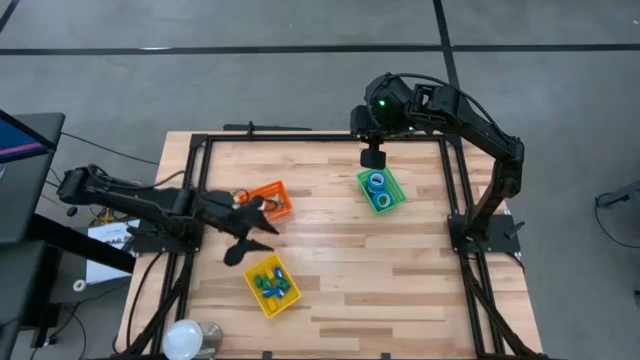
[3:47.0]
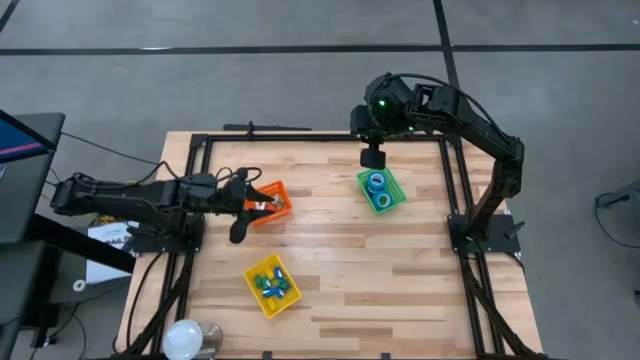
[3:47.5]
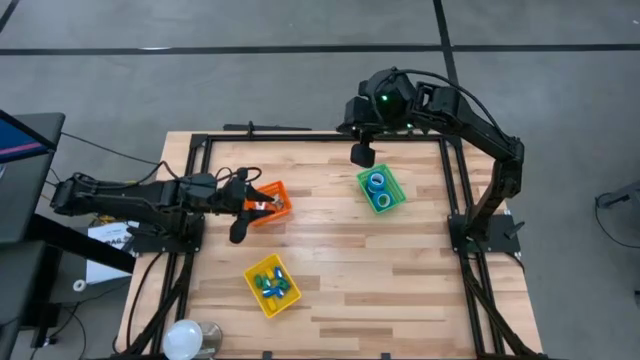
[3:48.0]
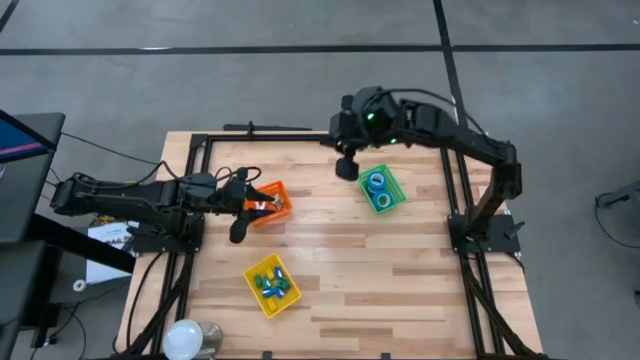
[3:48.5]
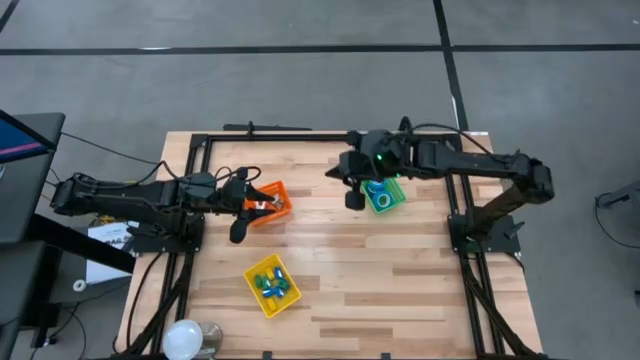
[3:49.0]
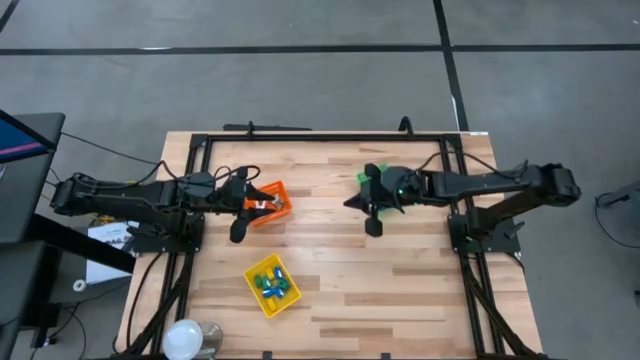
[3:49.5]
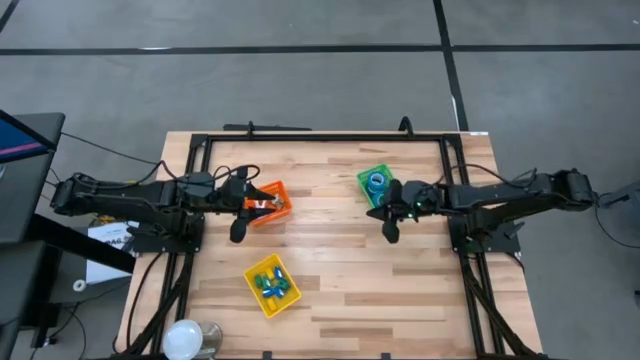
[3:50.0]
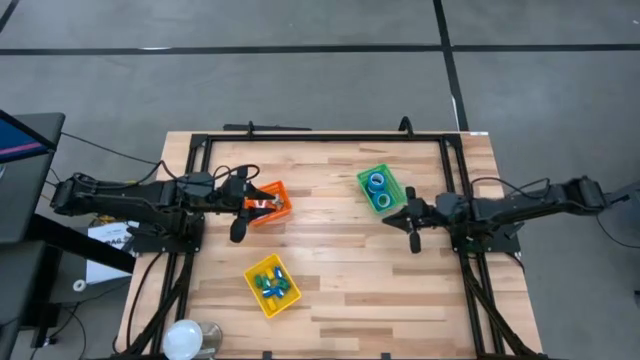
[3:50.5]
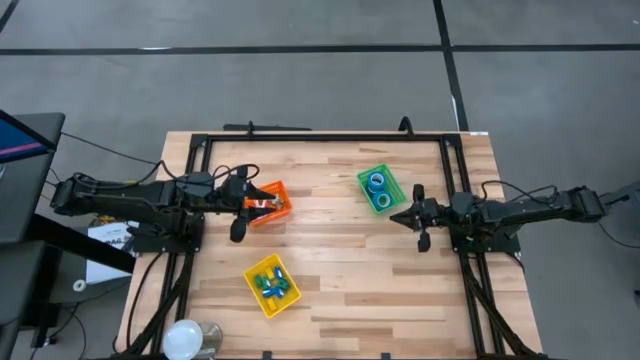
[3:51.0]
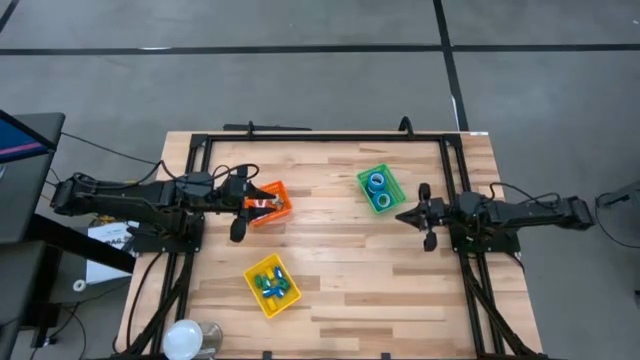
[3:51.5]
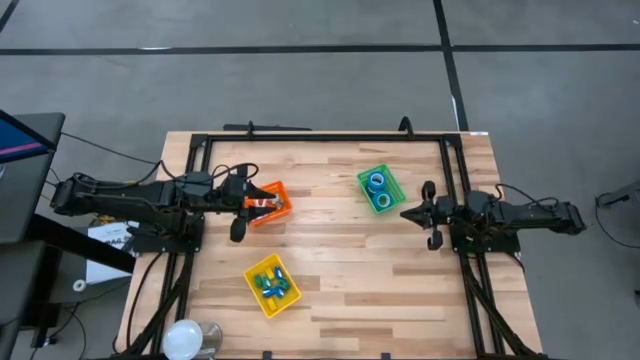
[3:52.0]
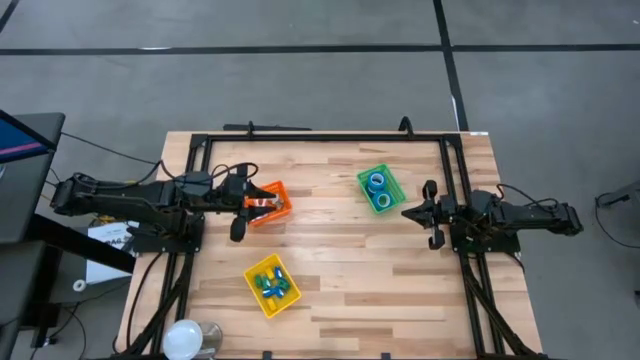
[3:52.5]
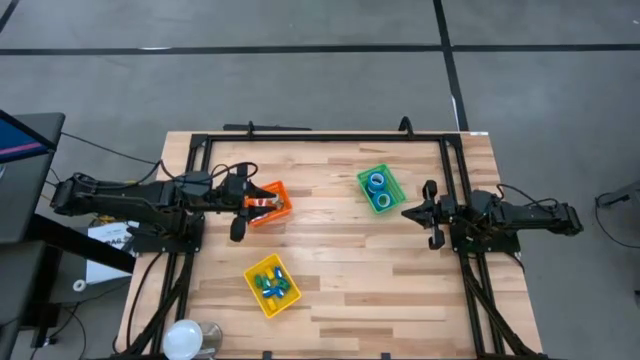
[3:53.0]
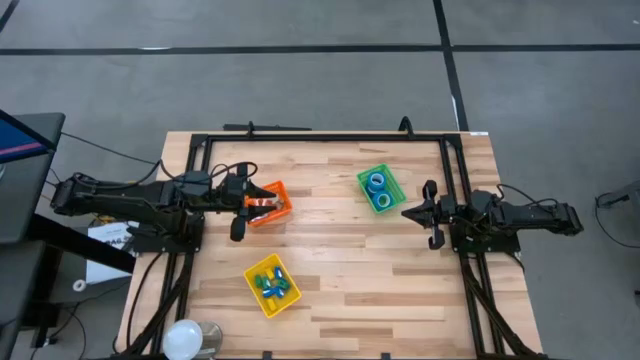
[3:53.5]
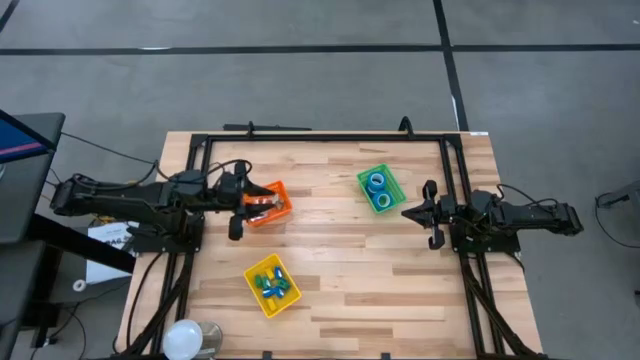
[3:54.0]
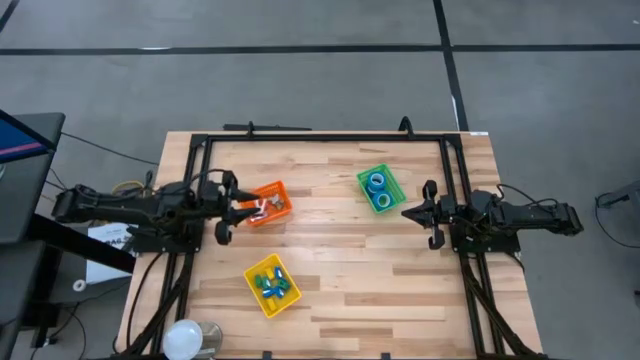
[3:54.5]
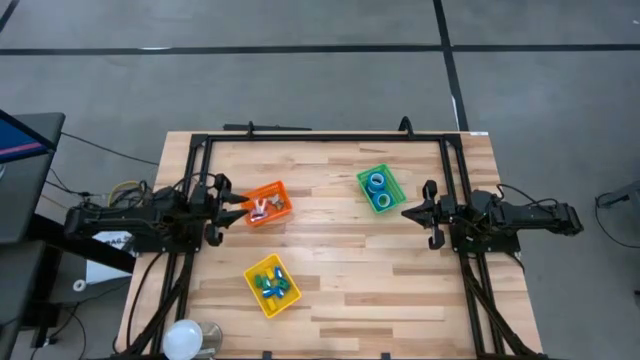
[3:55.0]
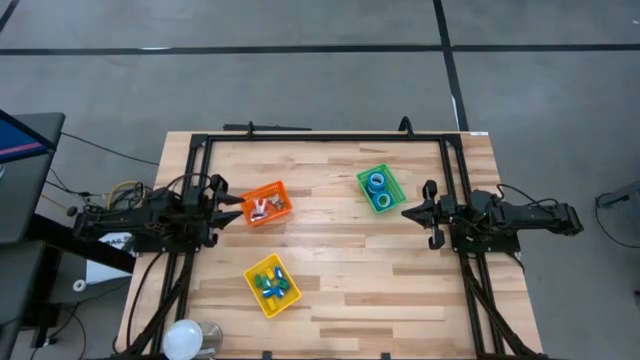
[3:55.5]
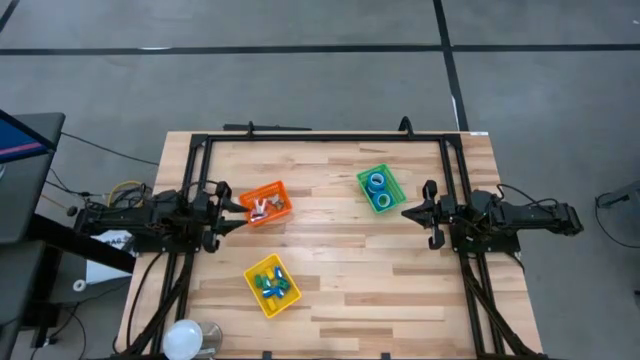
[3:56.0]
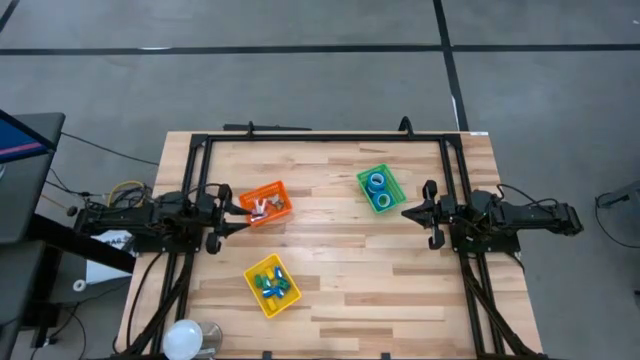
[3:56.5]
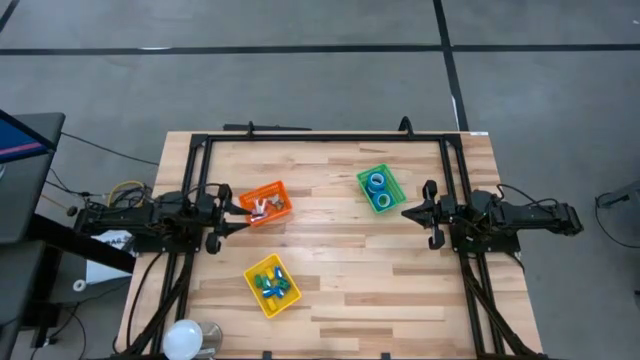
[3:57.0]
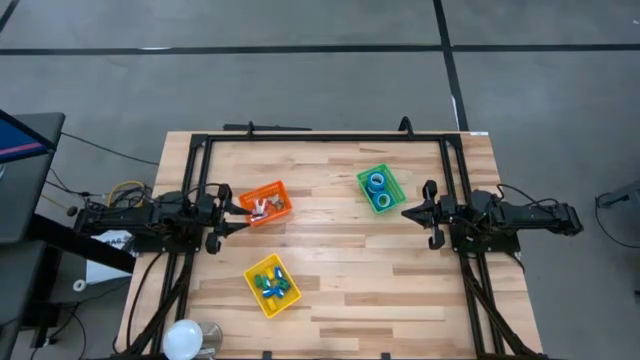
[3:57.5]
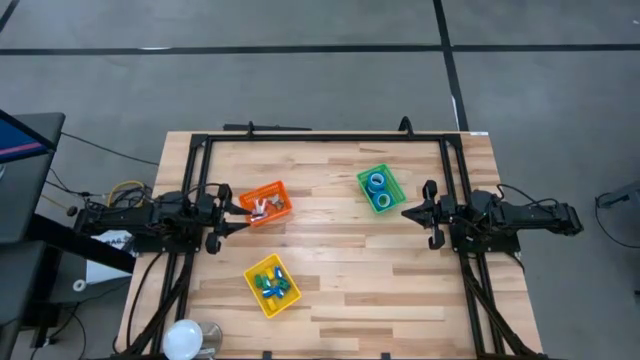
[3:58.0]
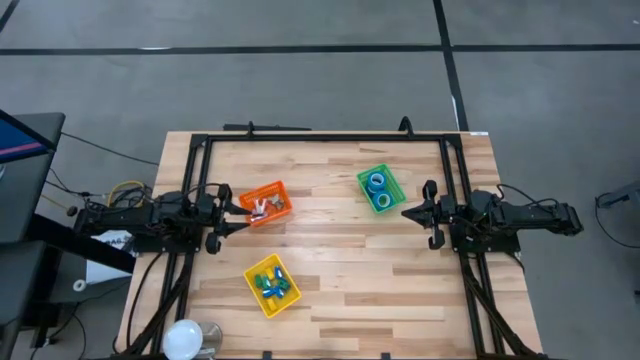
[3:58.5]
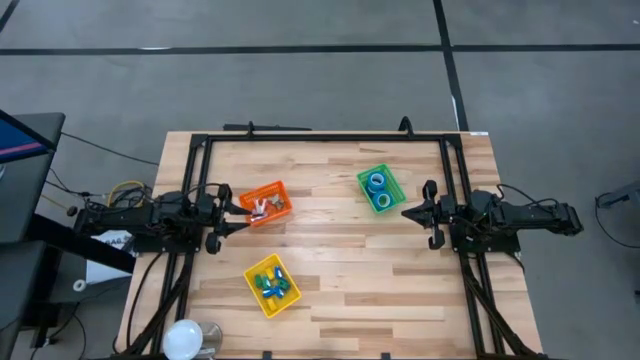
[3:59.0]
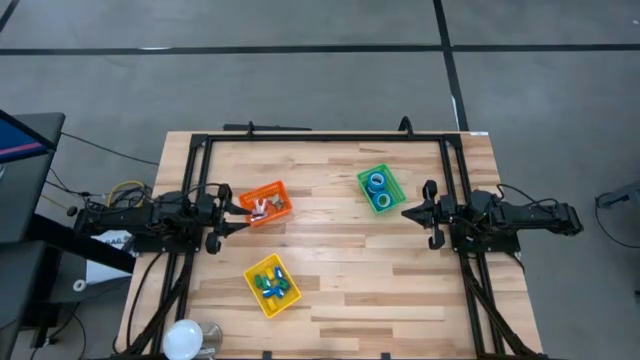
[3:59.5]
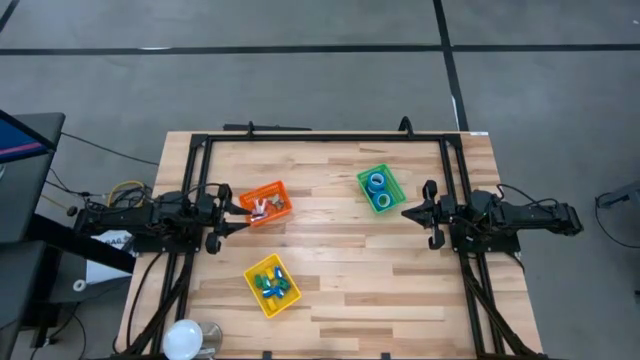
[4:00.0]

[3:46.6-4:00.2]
Task: Pick and place Stapler, Stapler remover, tape
Return to Home Position

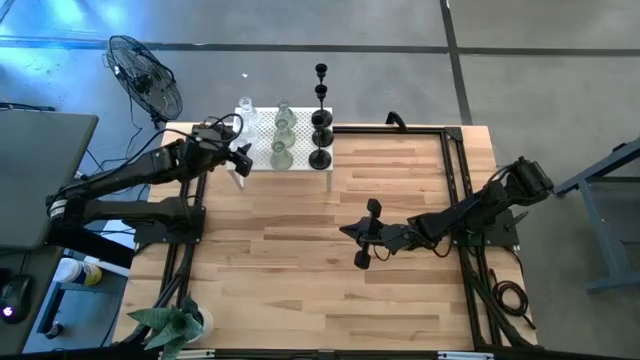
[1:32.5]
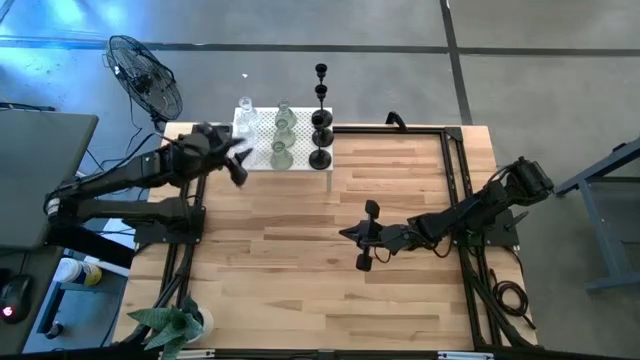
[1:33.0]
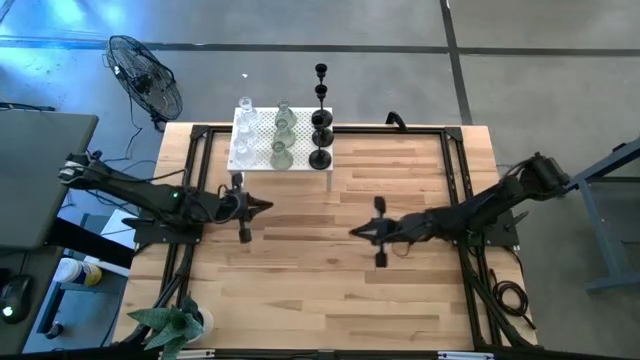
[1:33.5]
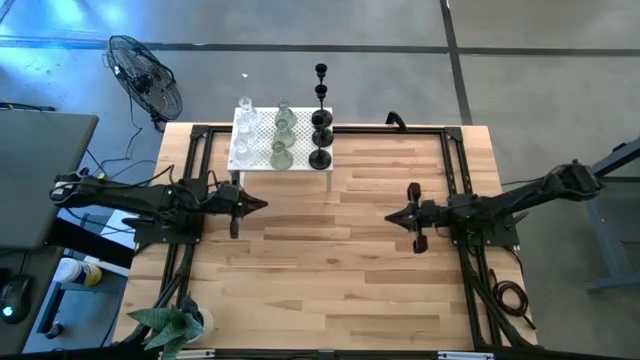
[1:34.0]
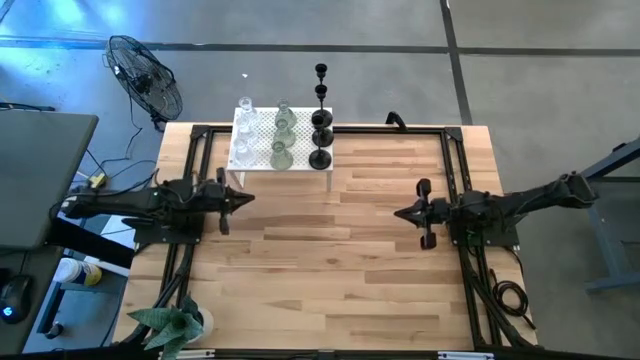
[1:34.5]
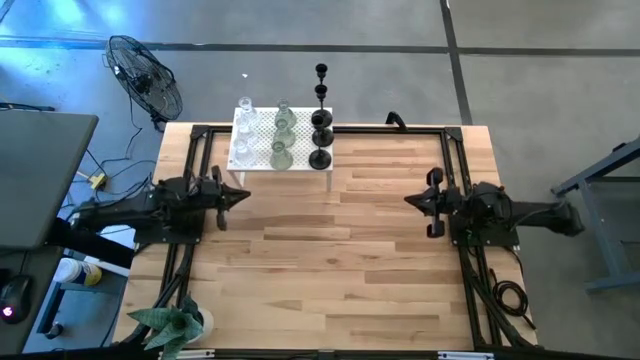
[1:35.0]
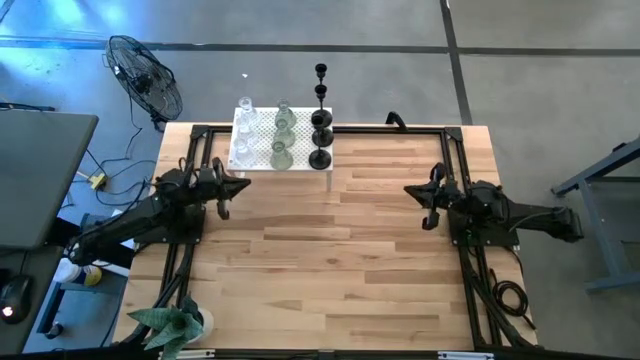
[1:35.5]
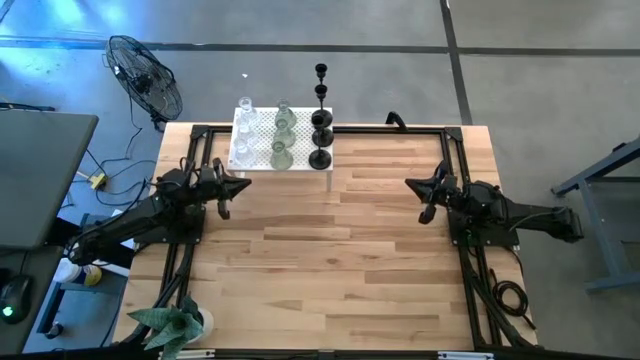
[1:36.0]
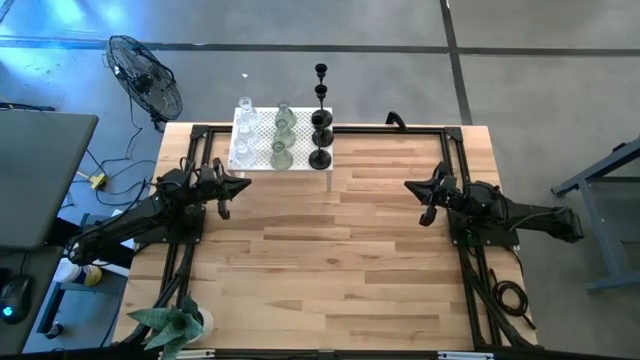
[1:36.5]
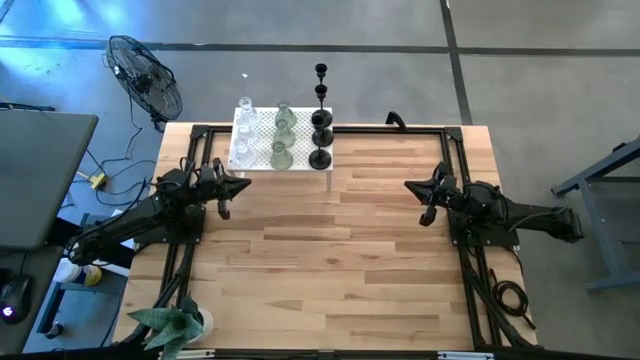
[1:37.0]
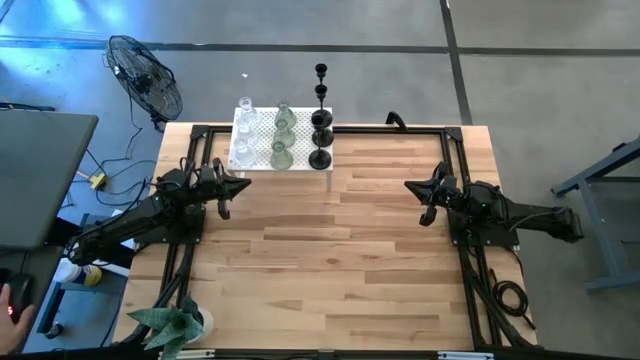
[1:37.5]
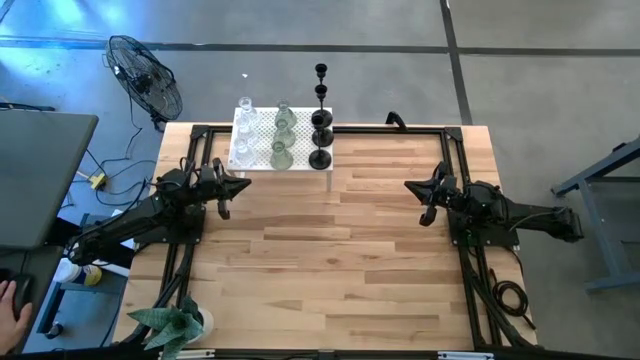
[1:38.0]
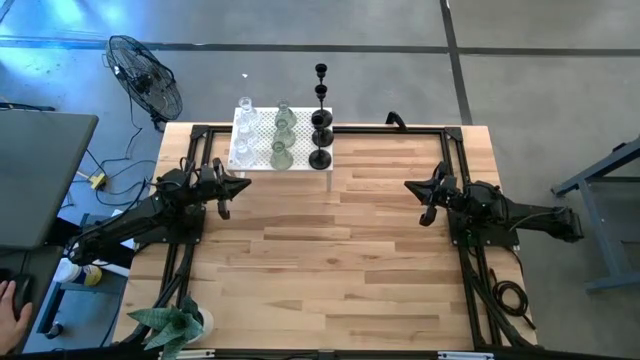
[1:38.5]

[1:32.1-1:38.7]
Task: Pick & Place candle stick holders
Return to Home Position
